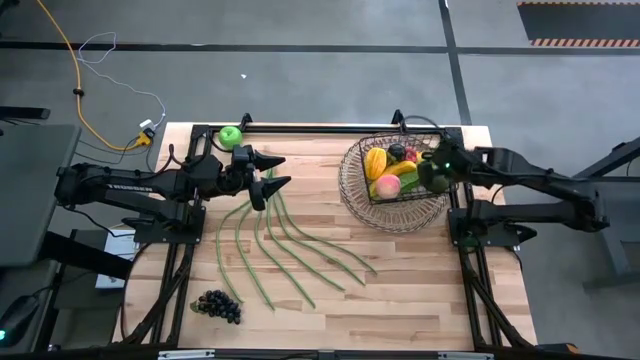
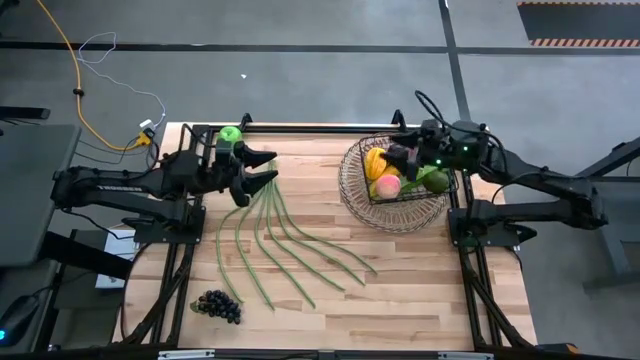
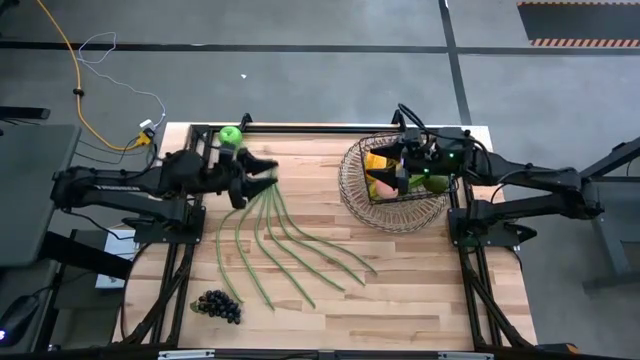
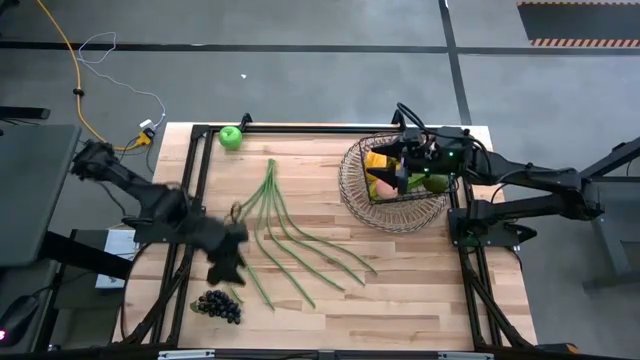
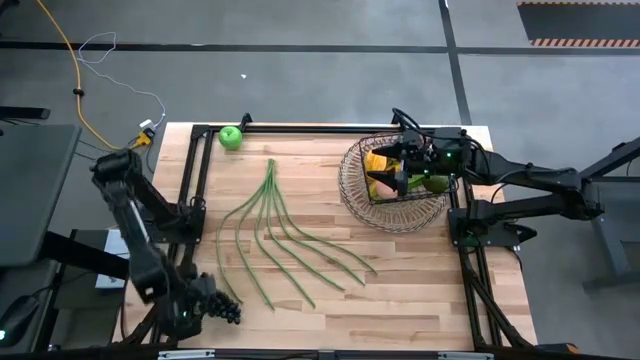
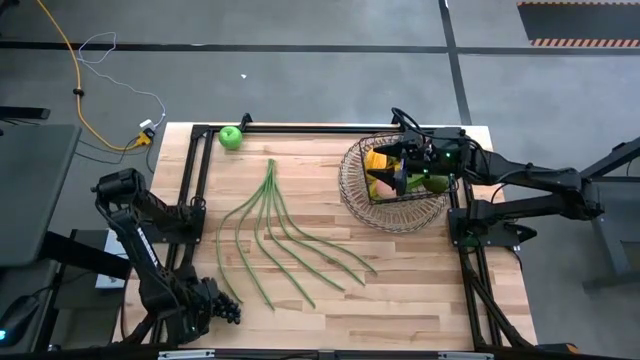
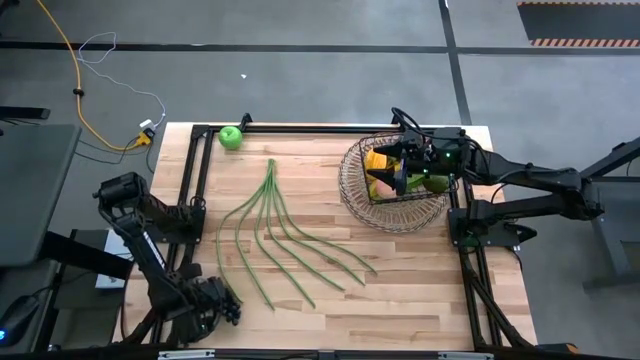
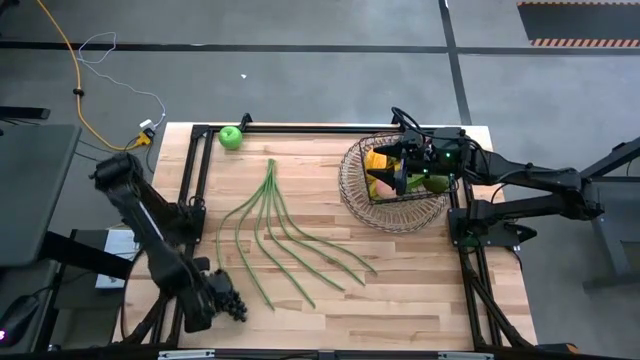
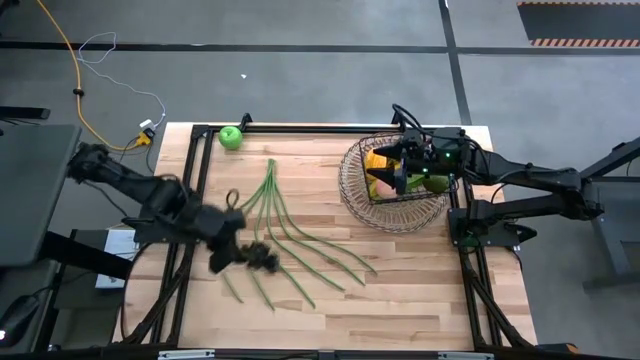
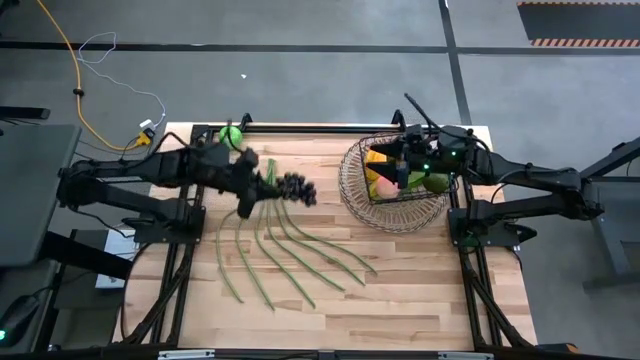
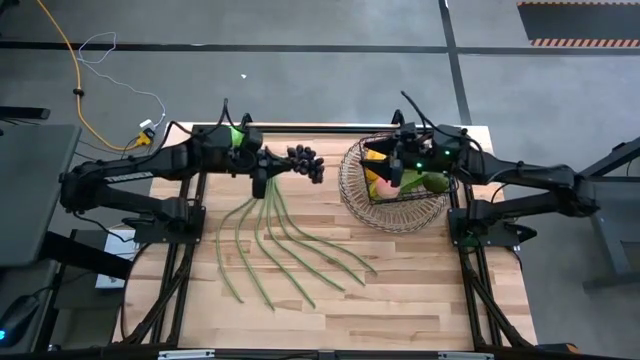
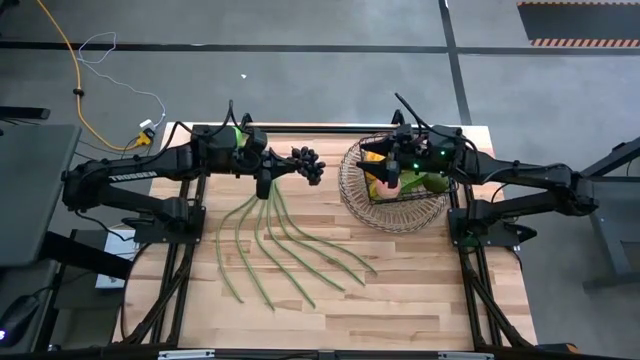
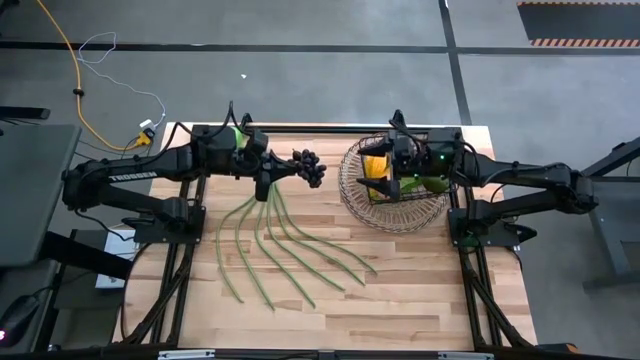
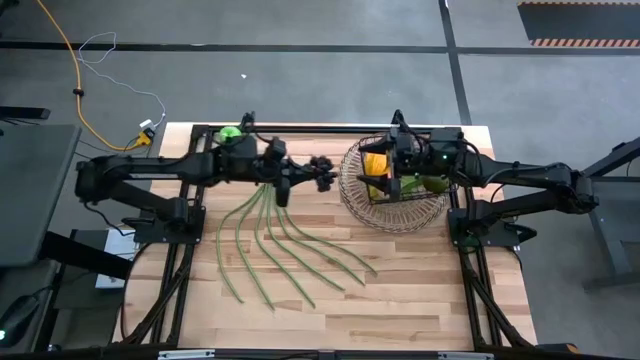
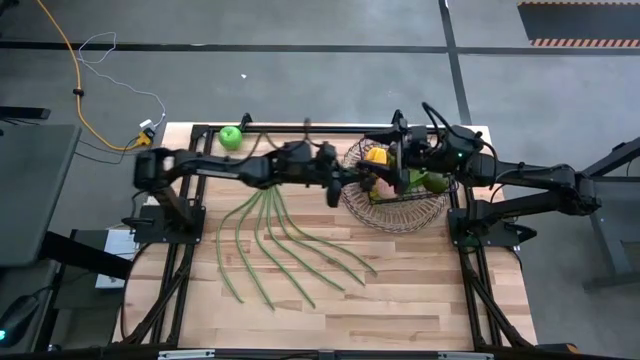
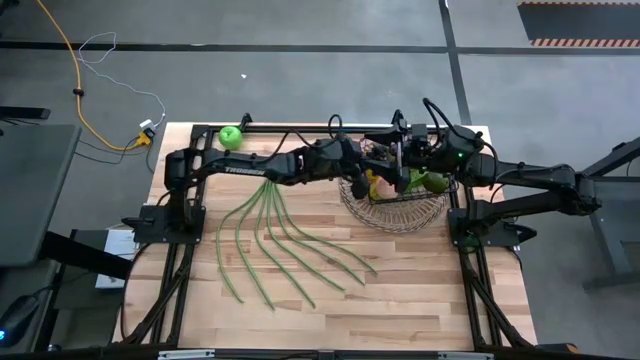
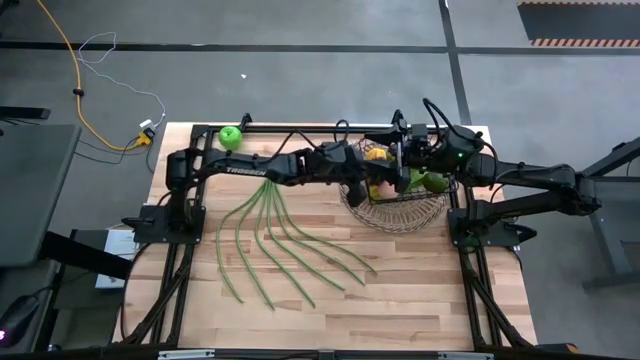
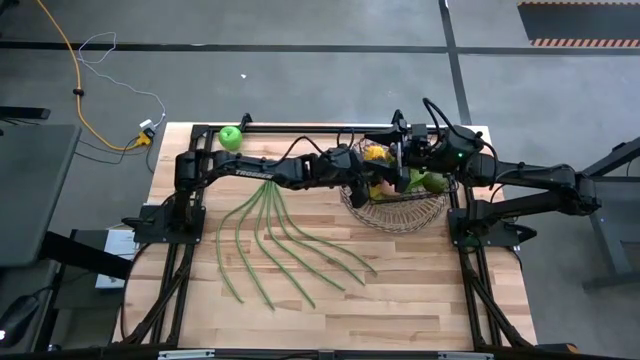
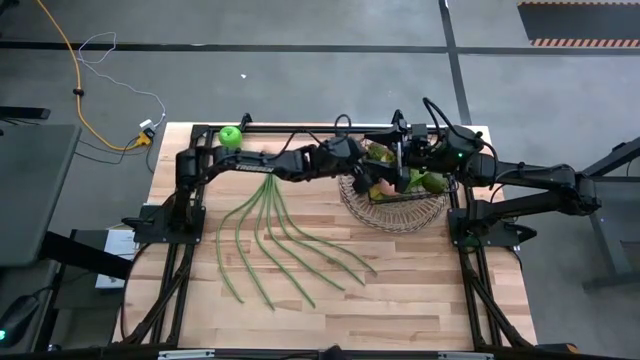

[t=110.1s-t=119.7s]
Task: Build produce basket
Put the dark purple grapes into the wire basket

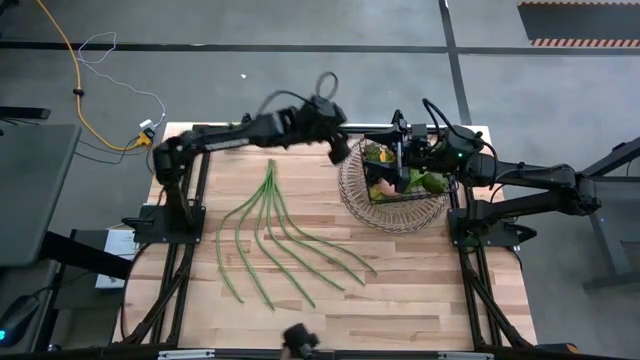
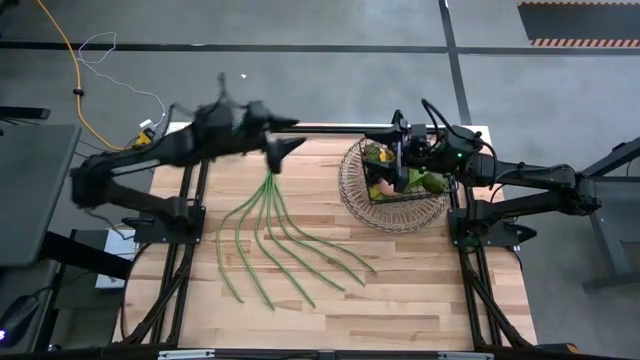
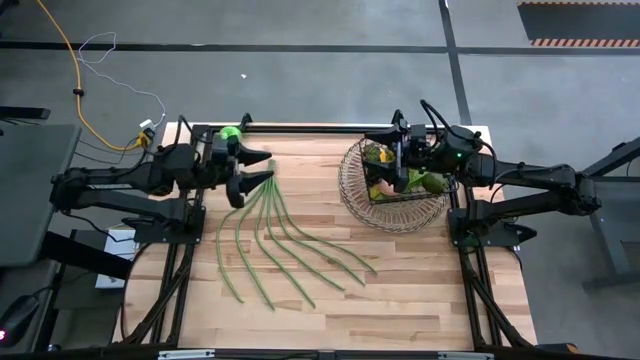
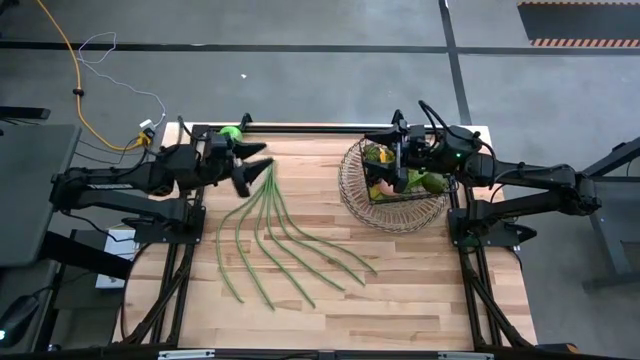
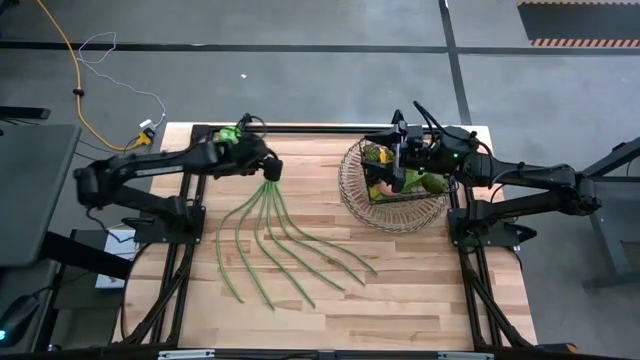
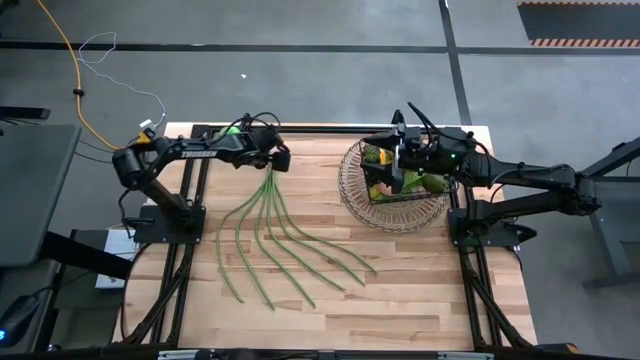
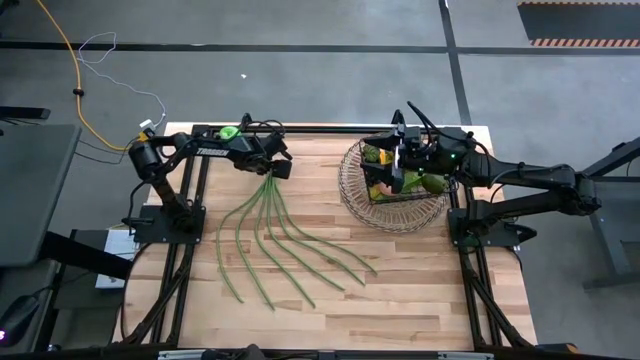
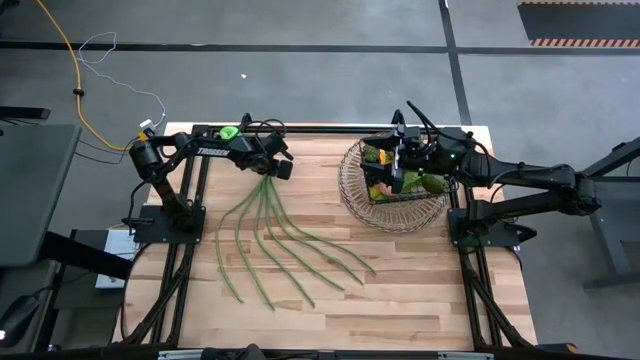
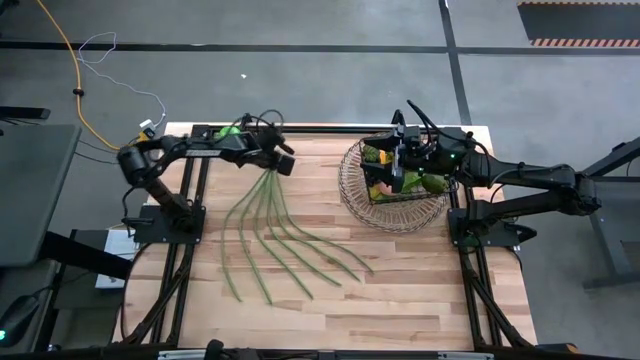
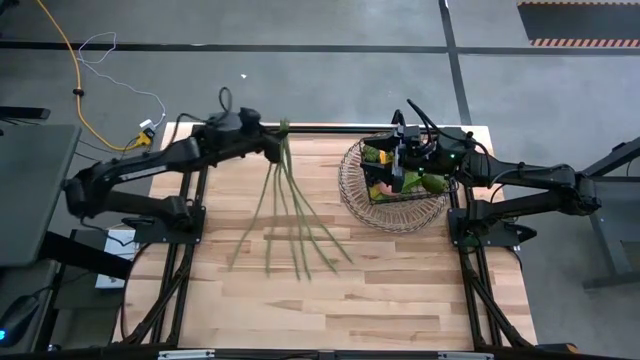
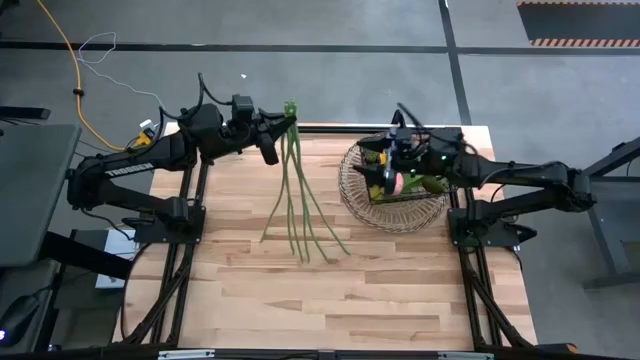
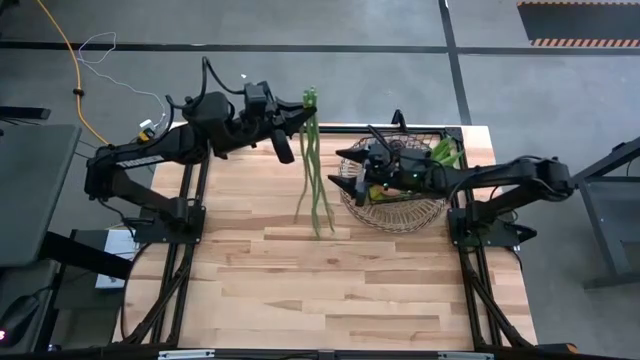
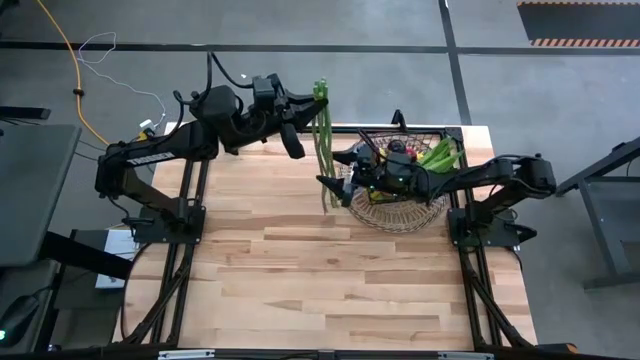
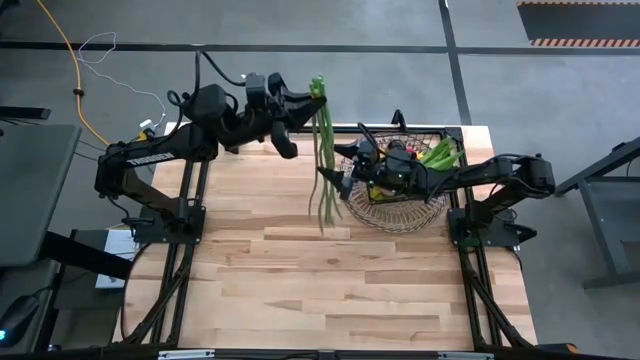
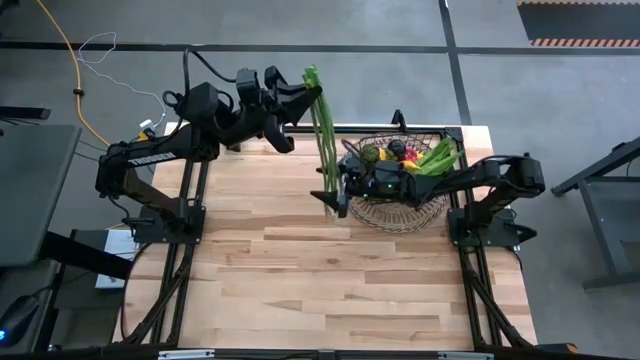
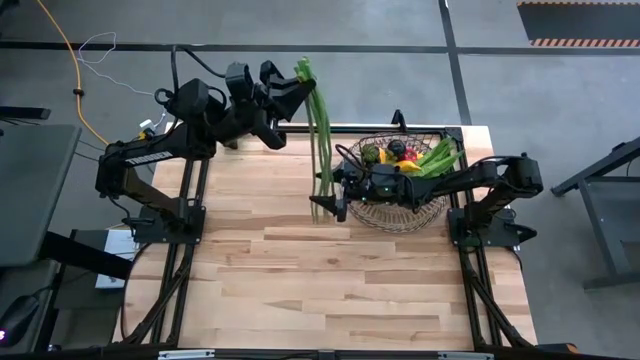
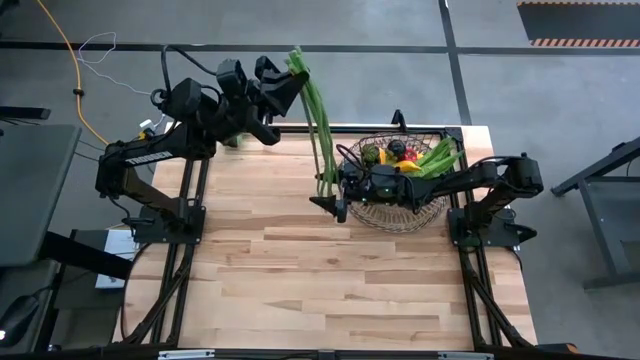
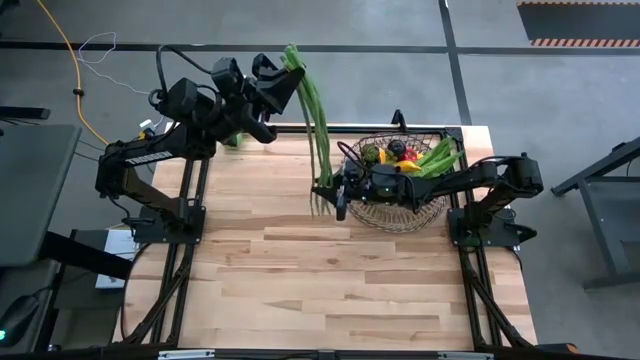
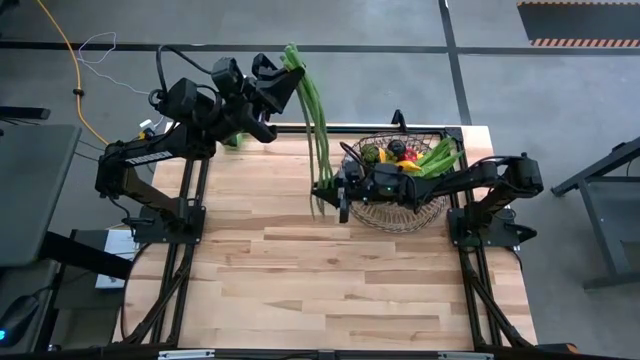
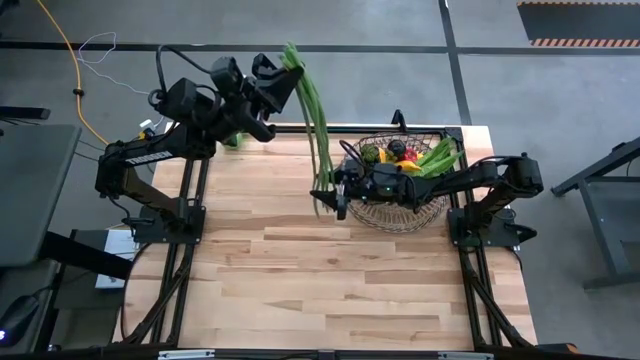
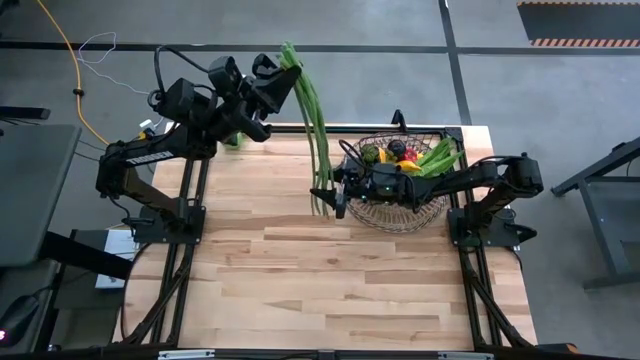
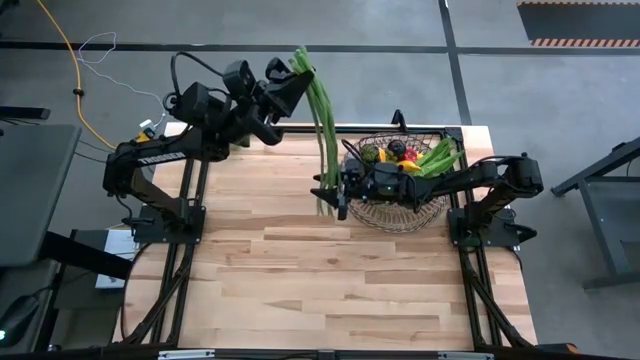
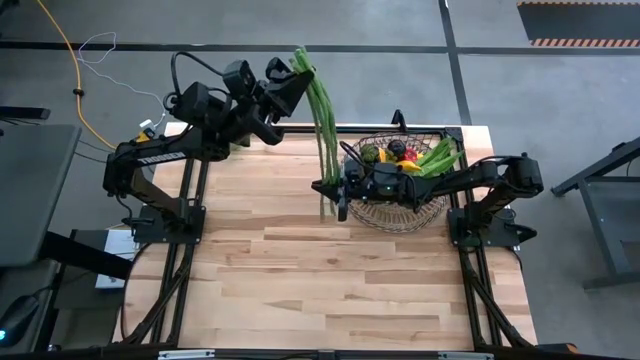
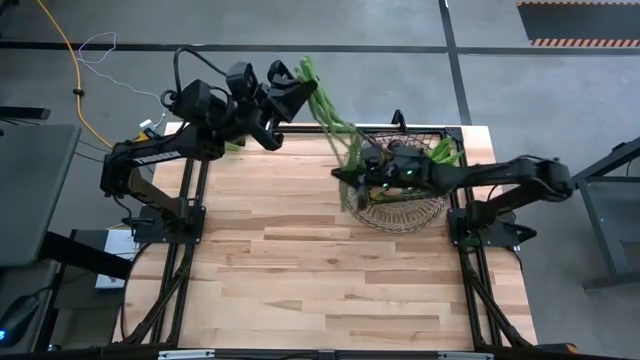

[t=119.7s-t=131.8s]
Put the green string beans into the wire basket

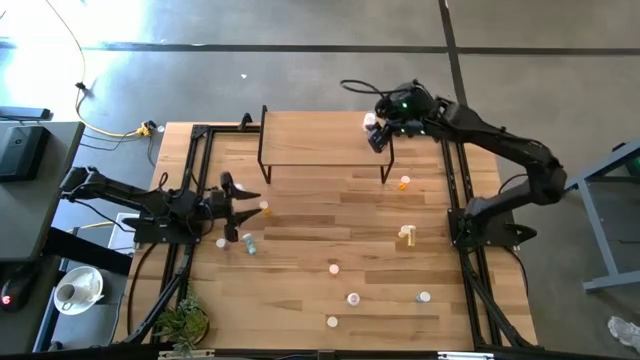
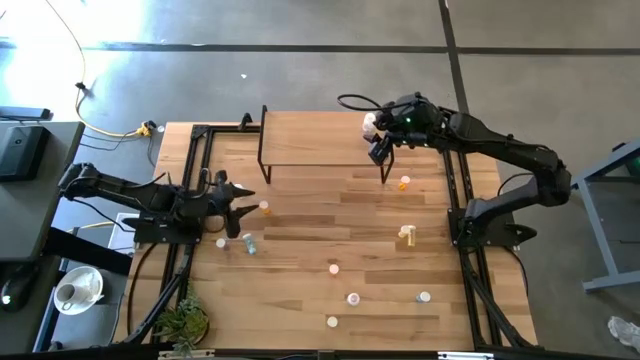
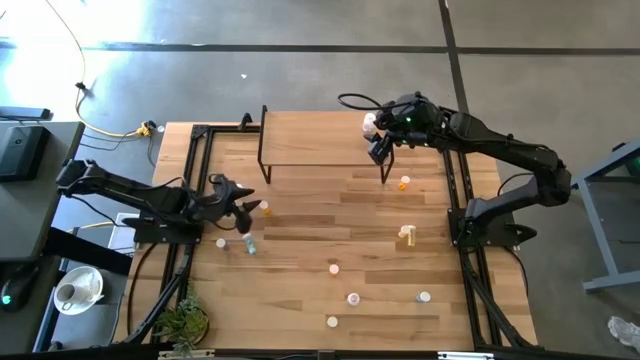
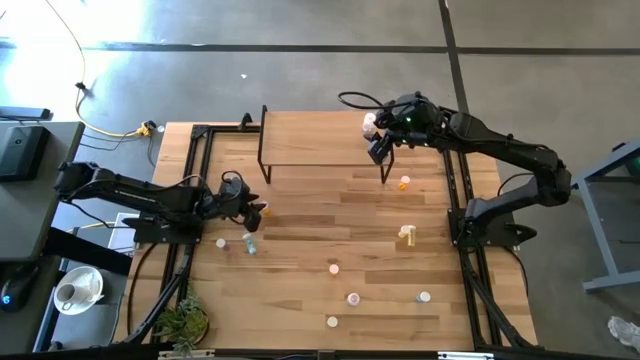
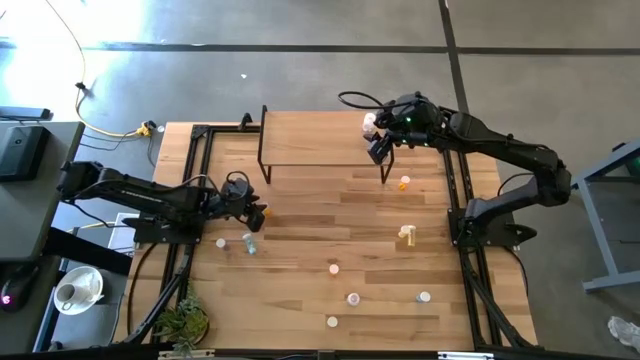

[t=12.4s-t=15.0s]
Task: Pick and place medicine bottles onto shelf by color
Put the middle left orange pill bottle on the shelf
